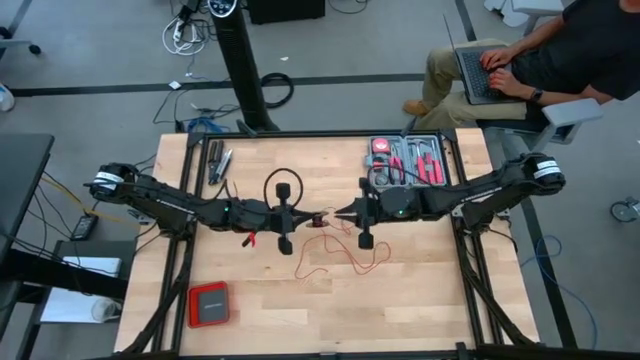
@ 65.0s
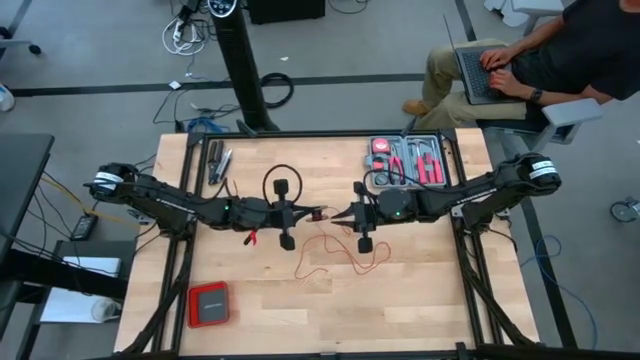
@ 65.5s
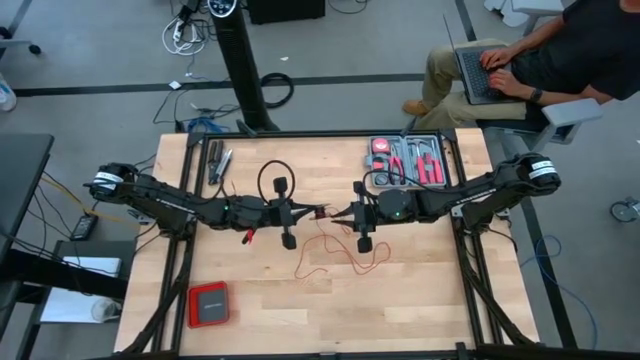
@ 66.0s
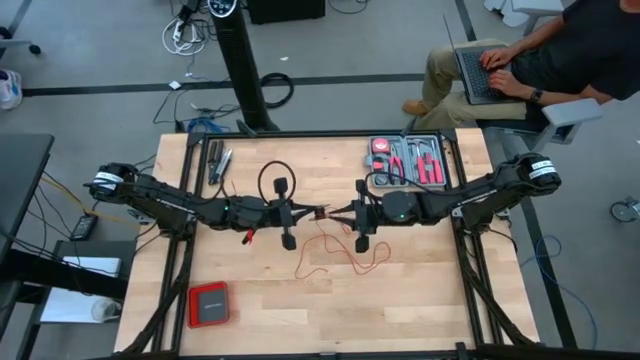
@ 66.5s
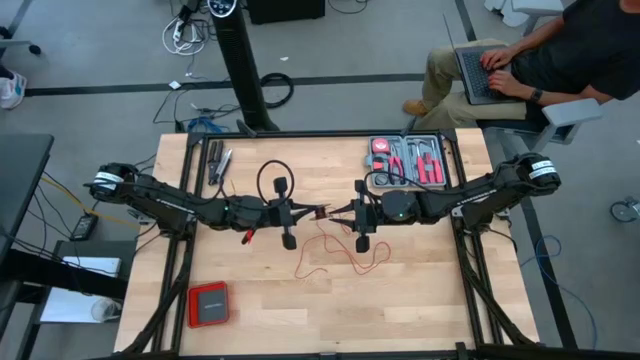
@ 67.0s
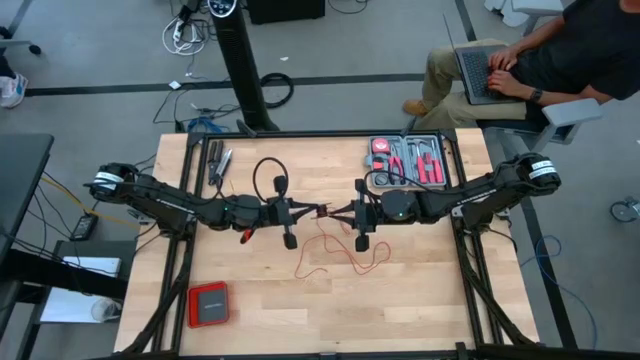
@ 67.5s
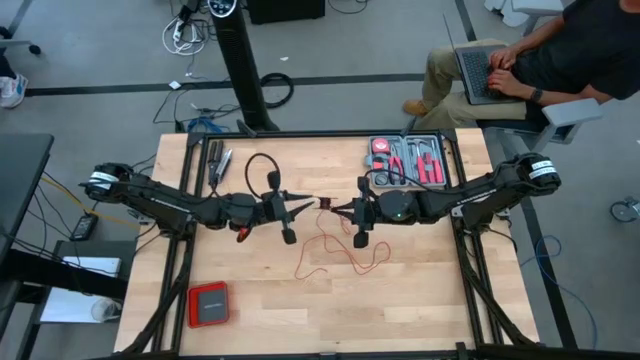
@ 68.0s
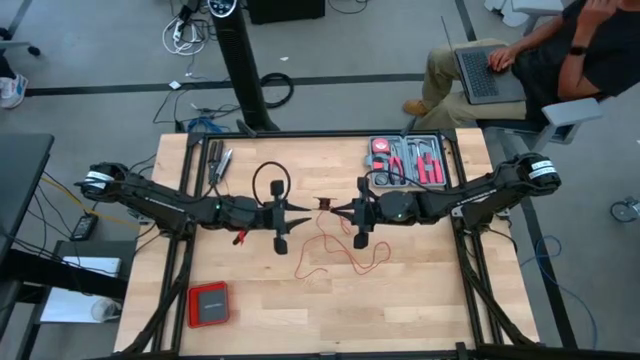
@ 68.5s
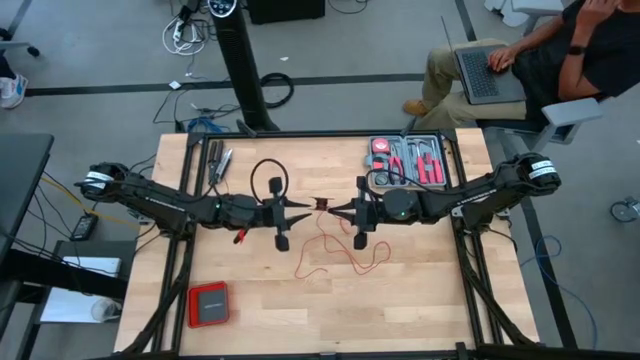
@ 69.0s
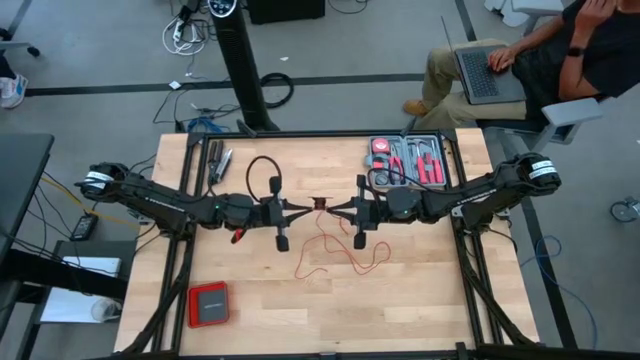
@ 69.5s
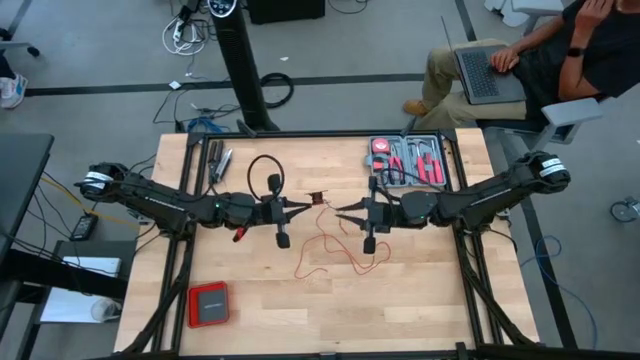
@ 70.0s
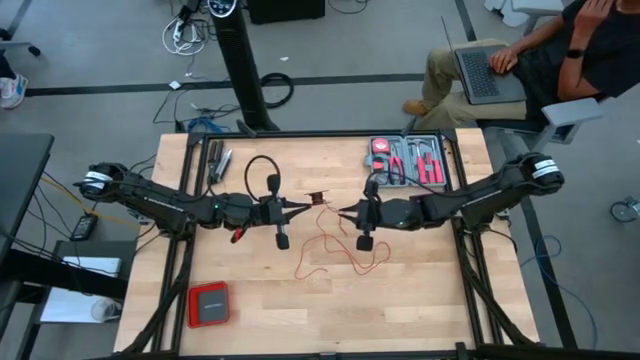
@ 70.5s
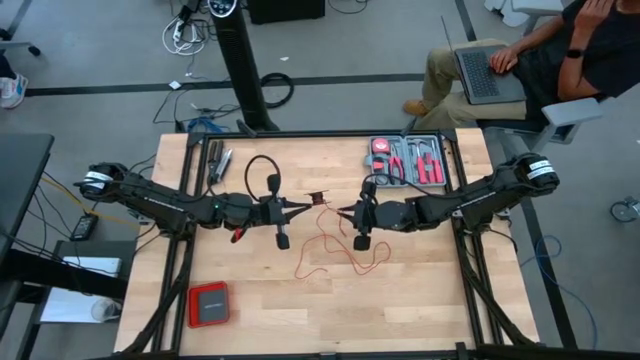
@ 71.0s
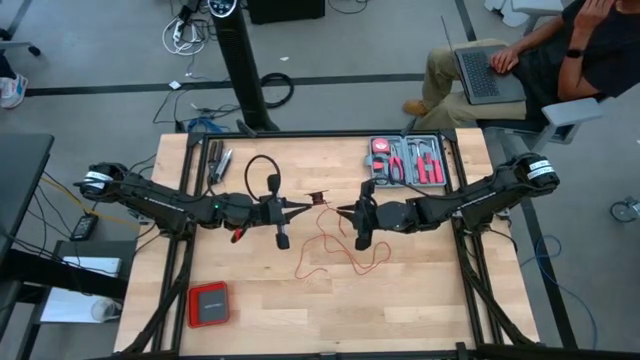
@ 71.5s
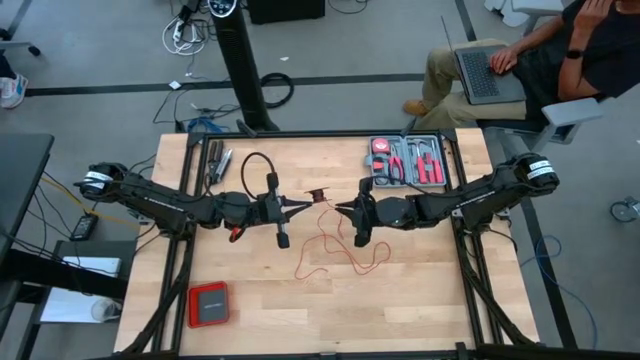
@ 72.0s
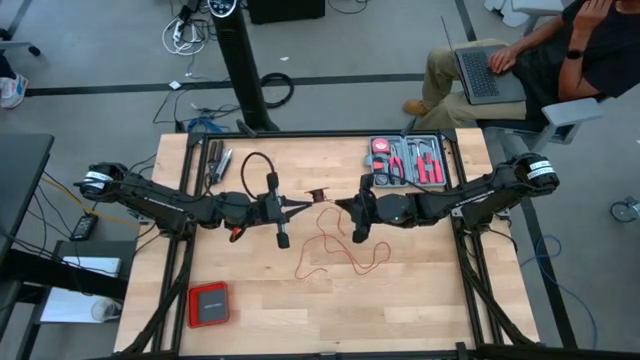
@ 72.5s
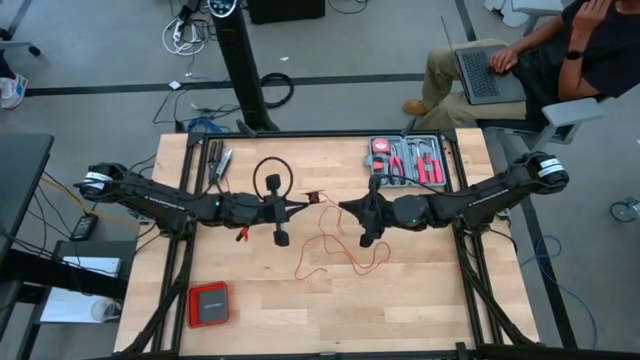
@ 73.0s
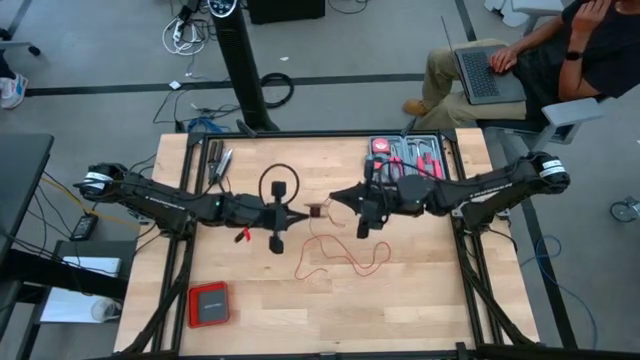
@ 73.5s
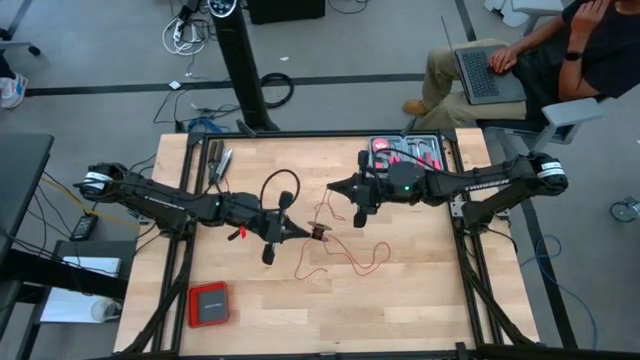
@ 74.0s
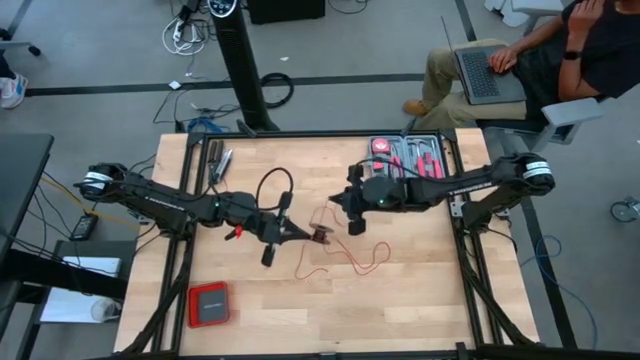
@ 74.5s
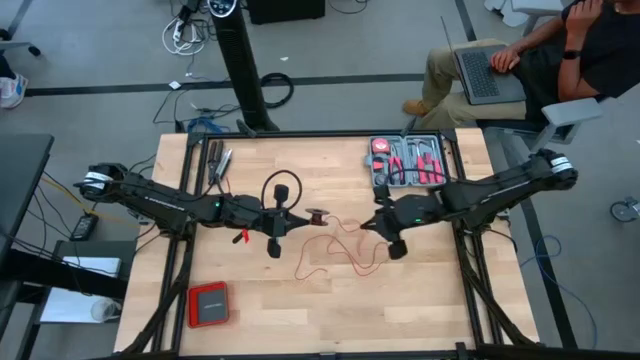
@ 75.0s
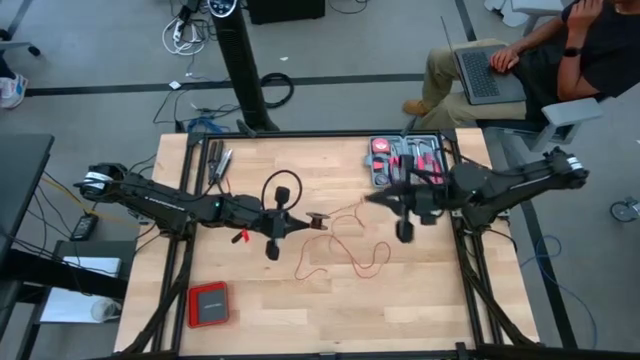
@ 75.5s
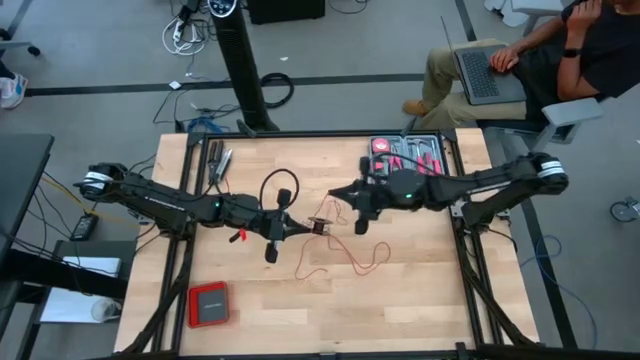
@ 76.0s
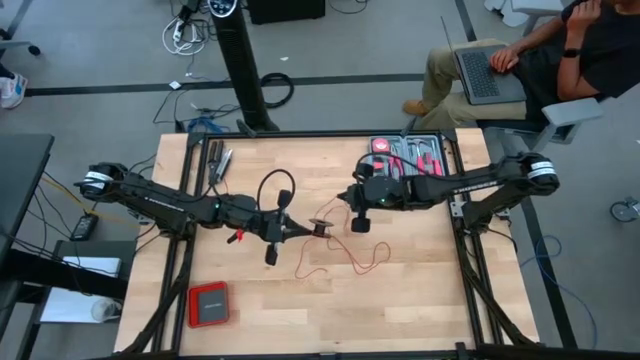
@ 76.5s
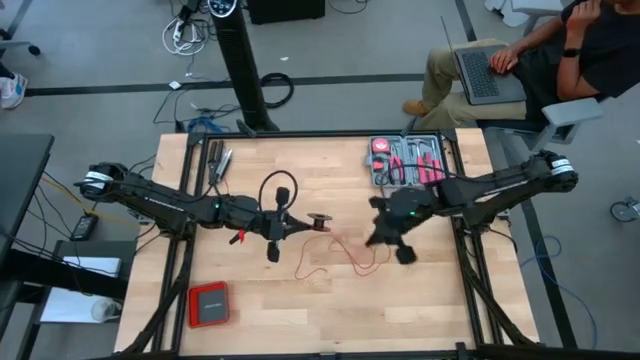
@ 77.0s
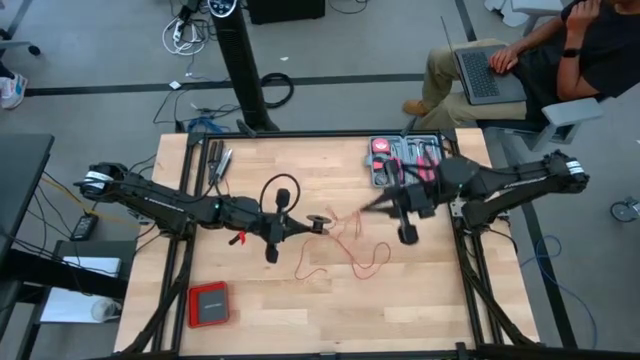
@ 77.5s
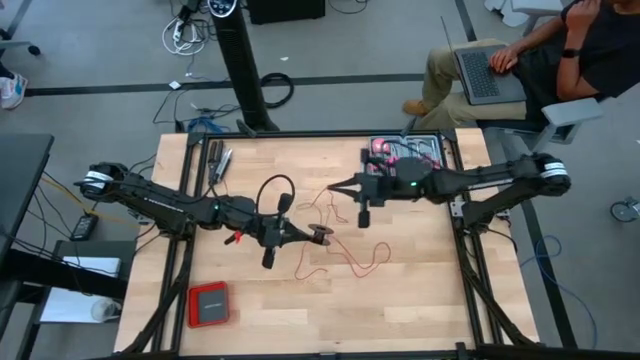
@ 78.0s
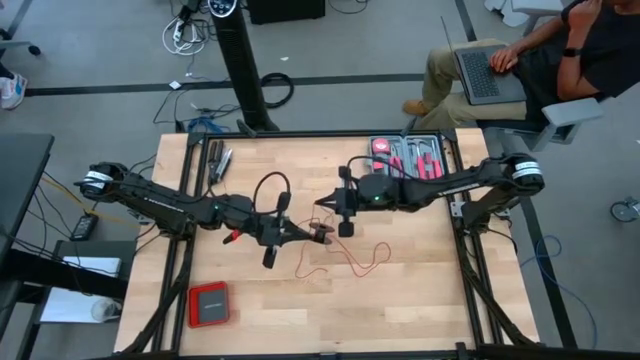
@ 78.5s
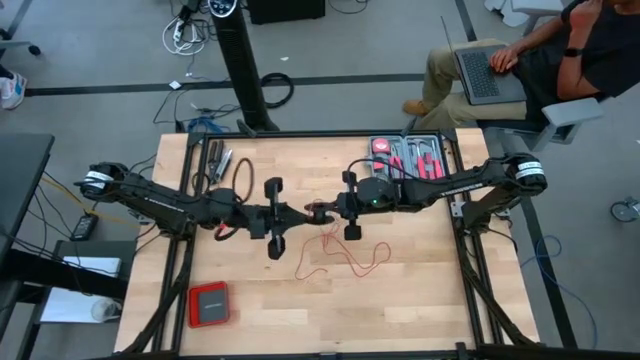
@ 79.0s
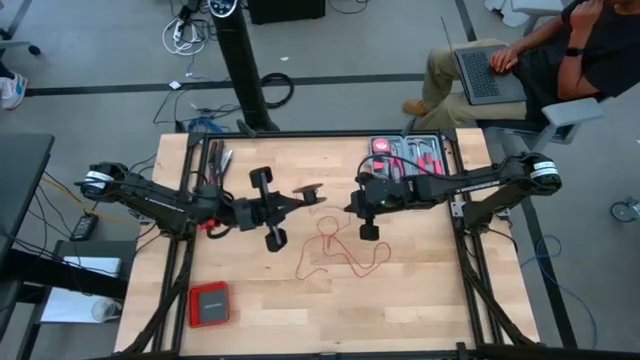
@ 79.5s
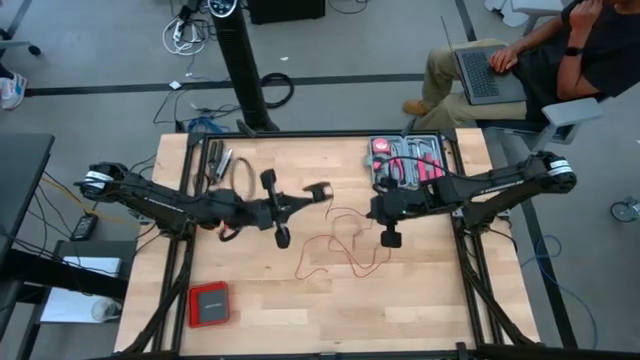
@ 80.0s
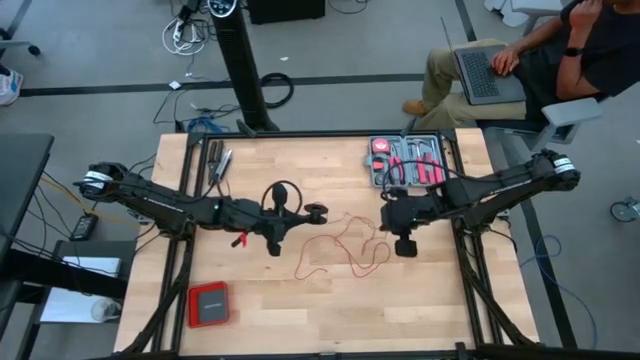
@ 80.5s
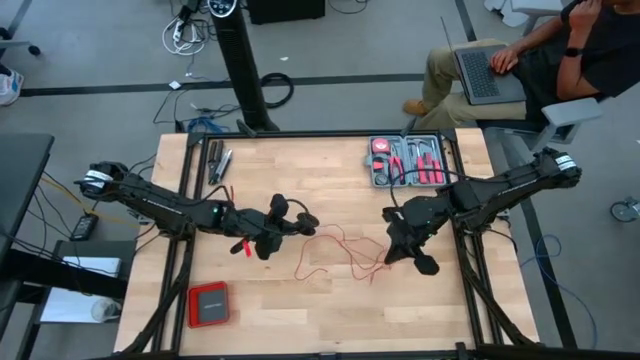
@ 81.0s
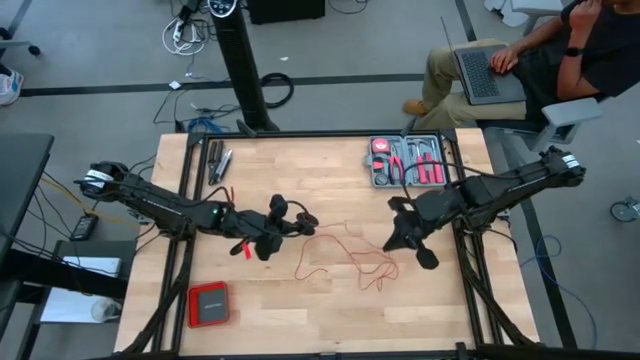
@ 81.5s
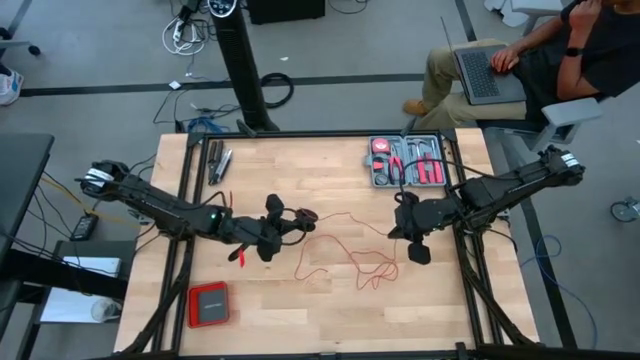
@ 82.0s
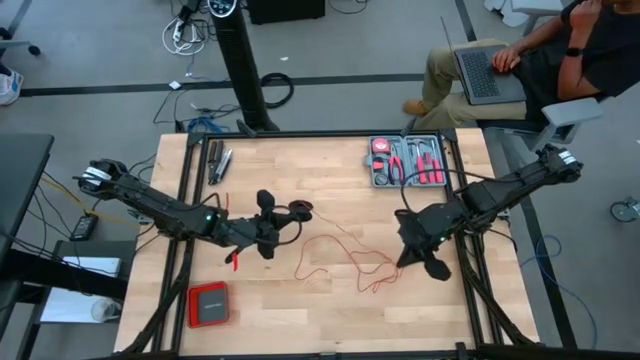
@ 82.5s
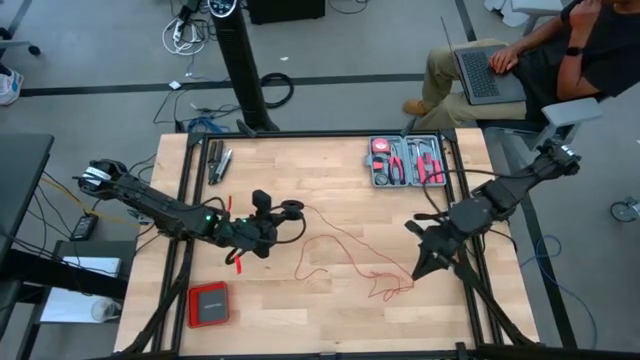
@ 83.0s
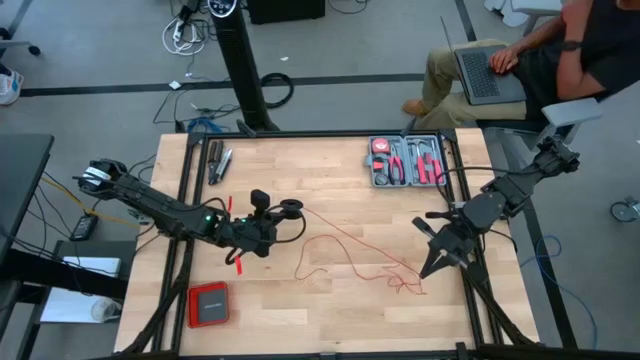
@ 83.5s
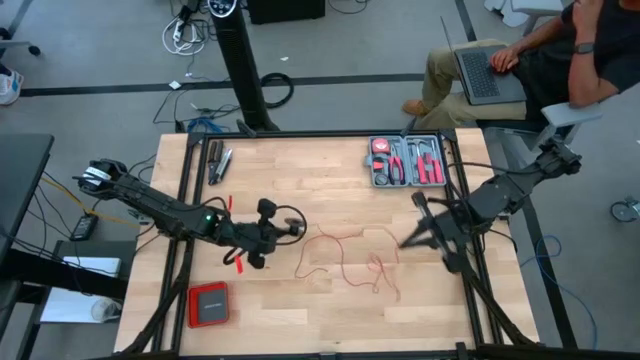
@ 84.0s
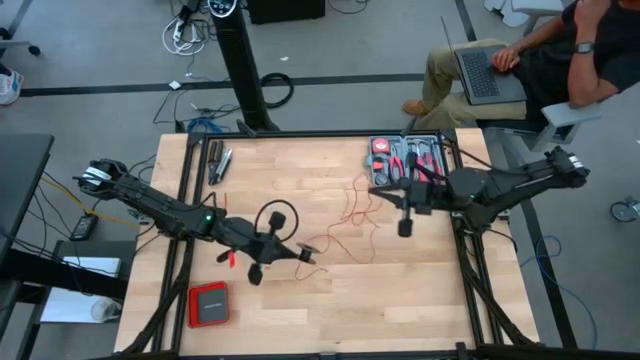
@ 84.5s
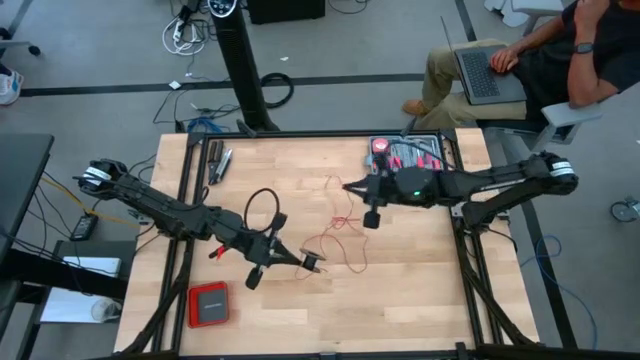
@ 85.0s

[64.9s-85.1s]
Task: Coil cords
Uncoil the red cable wire from the black spool

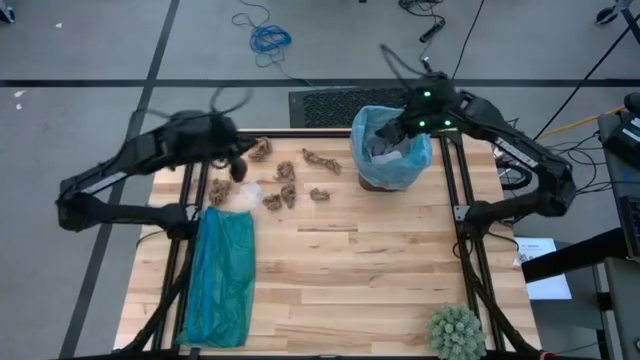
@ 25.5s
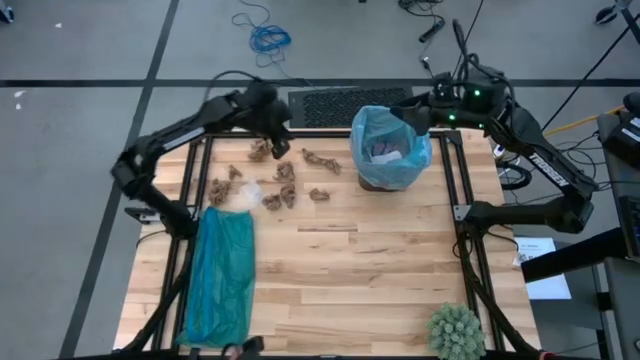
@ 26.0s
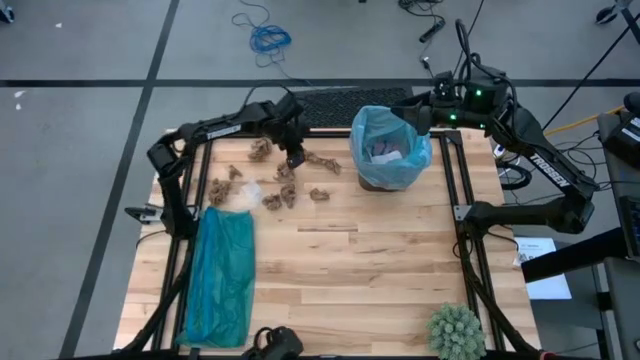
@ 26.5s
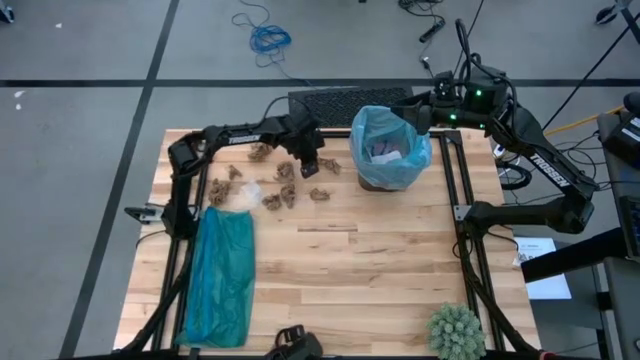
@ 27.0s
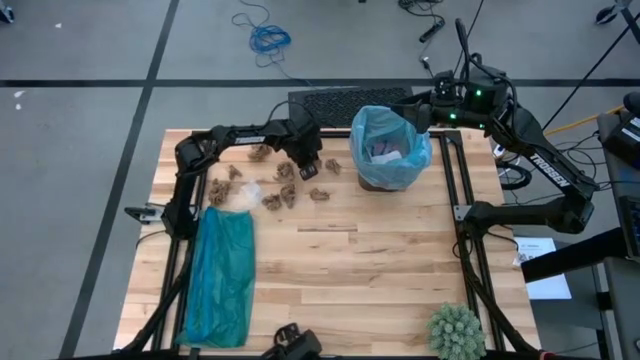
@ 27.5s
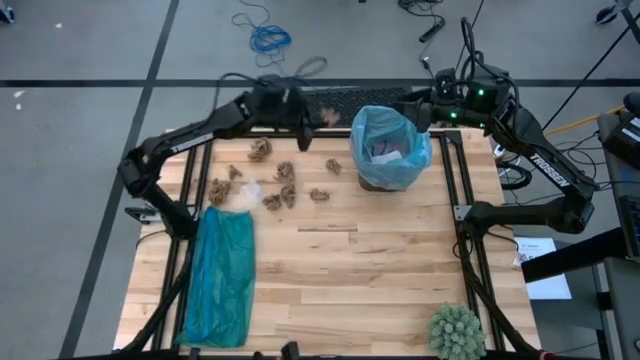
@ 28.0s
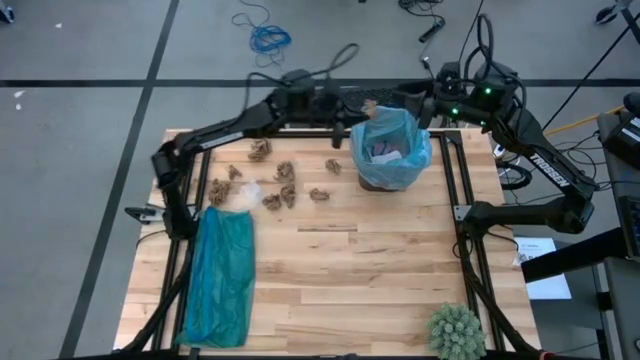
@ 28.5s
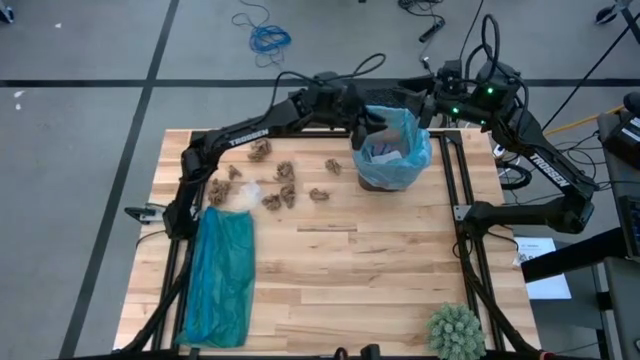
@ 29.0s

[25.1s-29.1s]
Task: place trash/remove bag and relplace
Put the brown napkin into the trash bin
